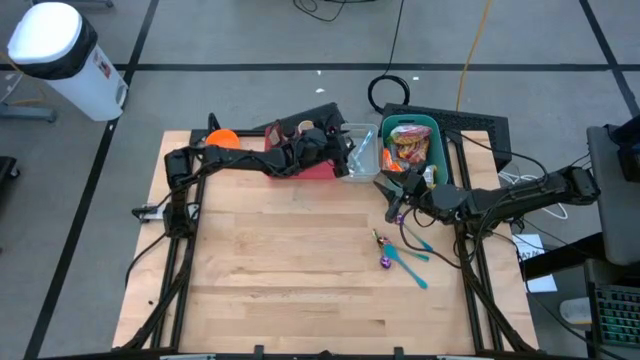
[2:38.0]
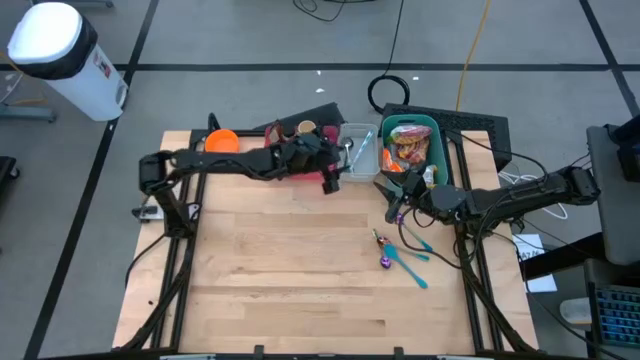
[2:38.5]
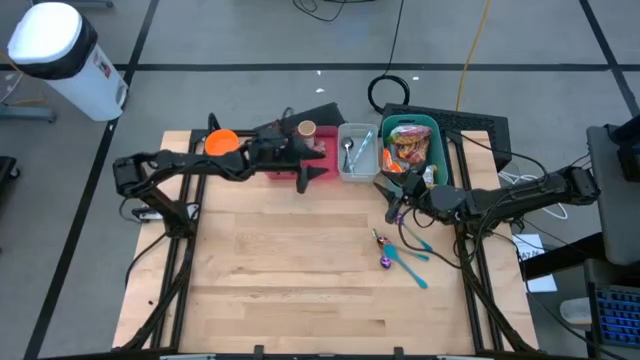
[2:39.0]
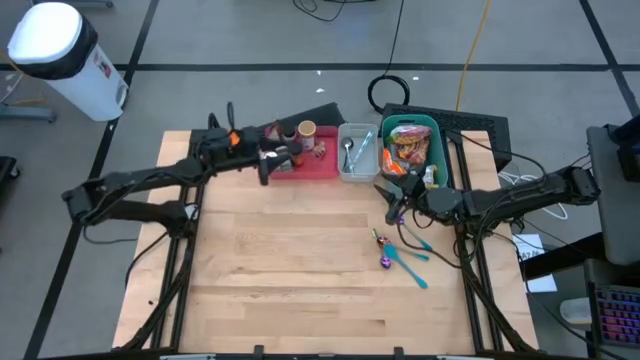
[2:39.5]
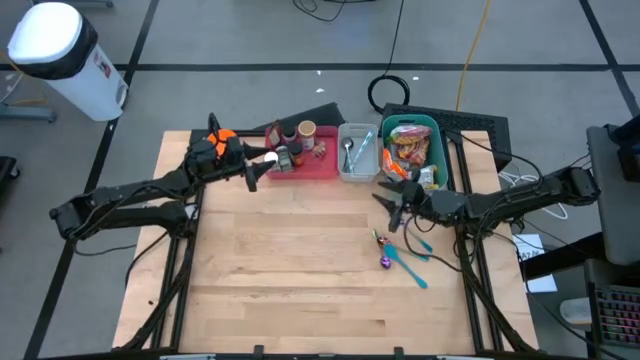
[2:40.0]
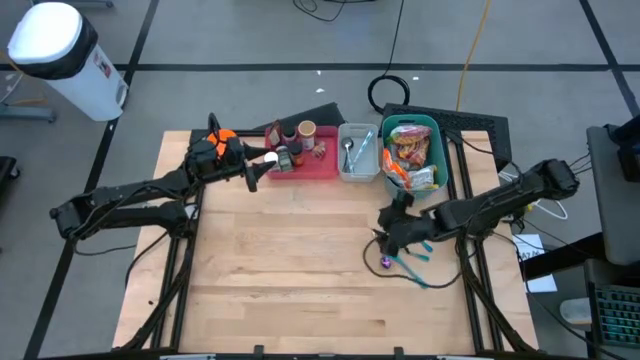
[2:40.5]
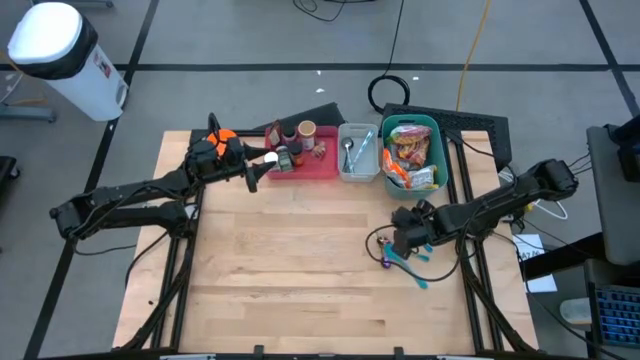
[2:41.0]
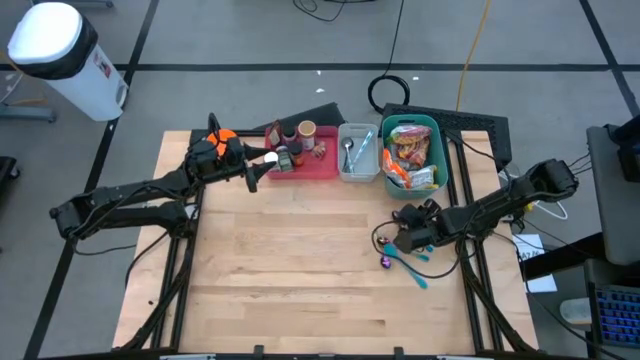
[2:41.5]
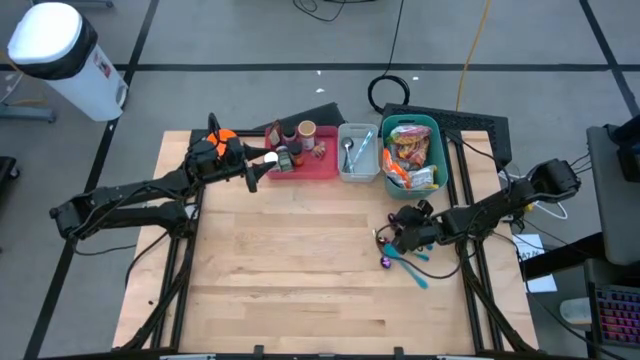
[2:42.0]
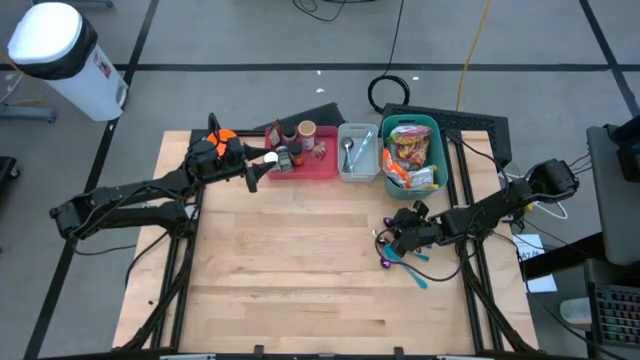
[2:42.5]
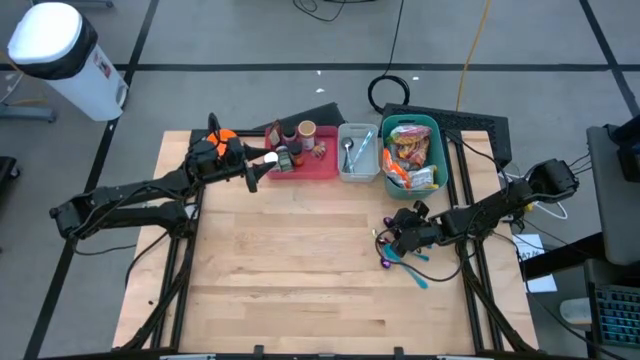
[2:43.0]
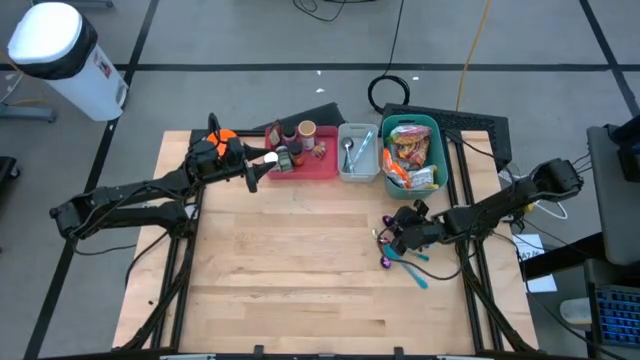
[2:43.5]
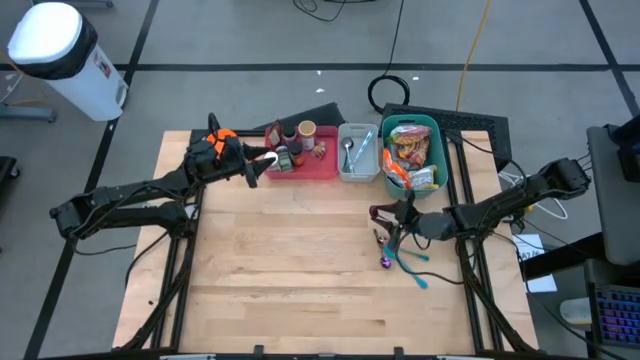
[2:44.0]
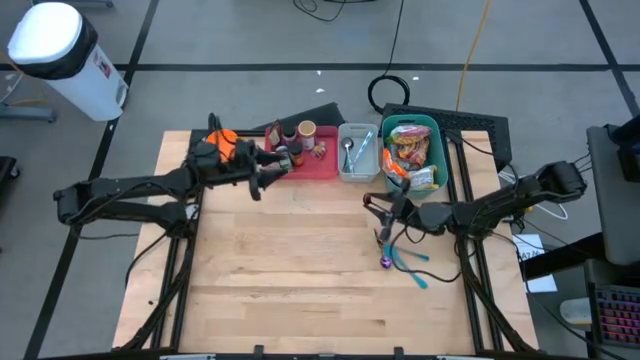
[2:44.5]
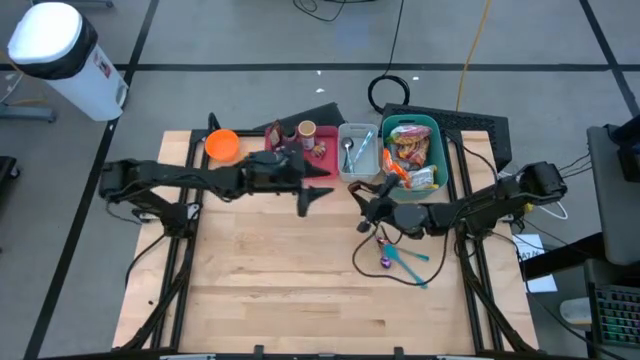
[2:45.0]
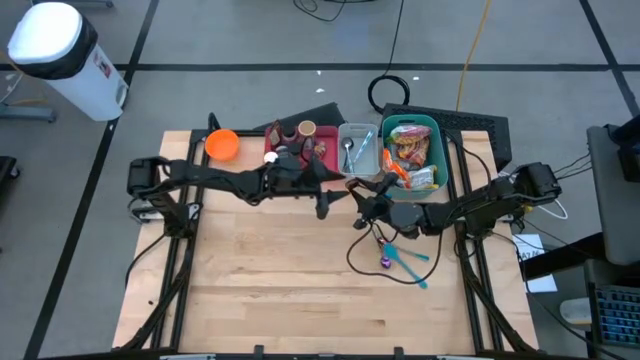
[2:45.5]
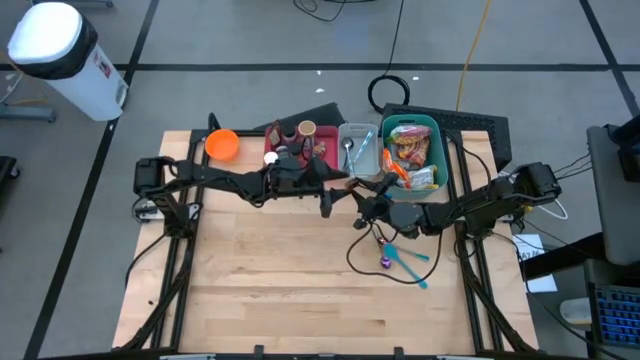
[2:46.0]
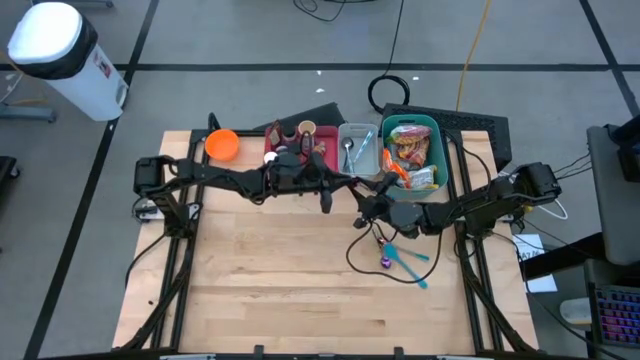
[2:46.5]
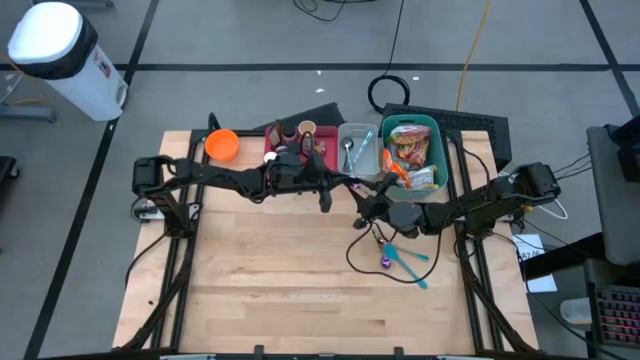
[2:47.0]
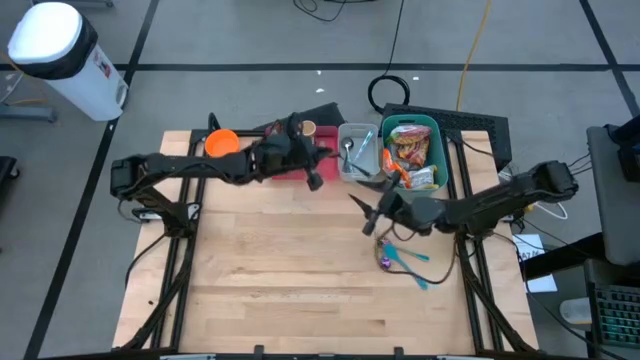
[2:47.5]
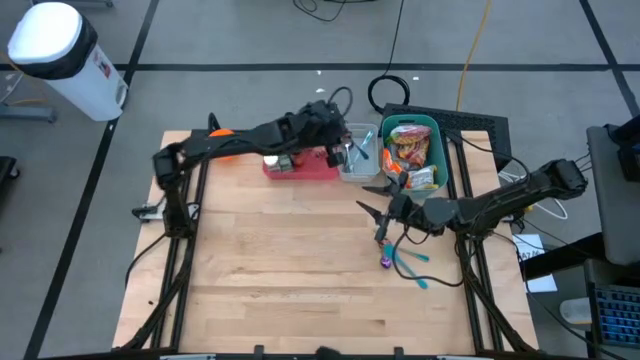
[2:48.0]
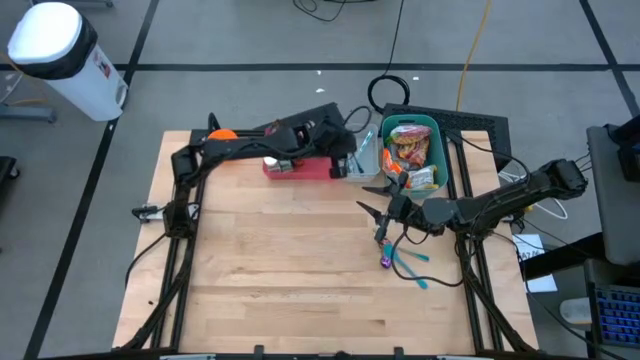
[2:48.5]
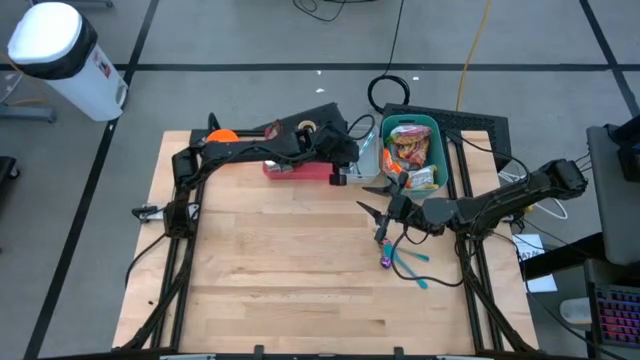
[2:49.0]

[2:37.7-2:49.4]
Task: Pick & Place Food Item
Put the top purple spoon into the white bin

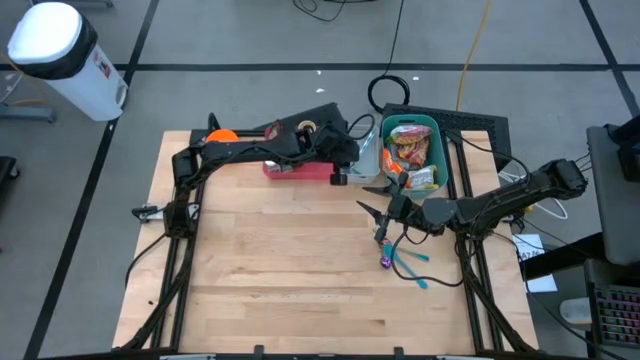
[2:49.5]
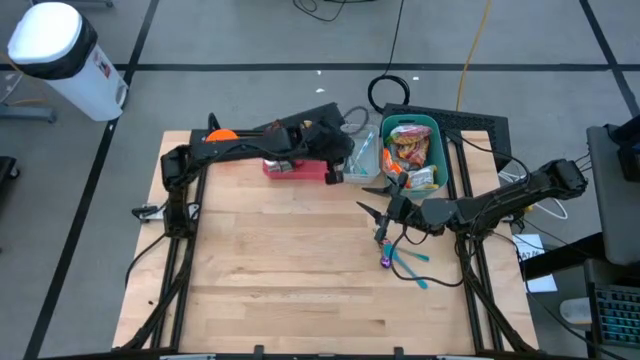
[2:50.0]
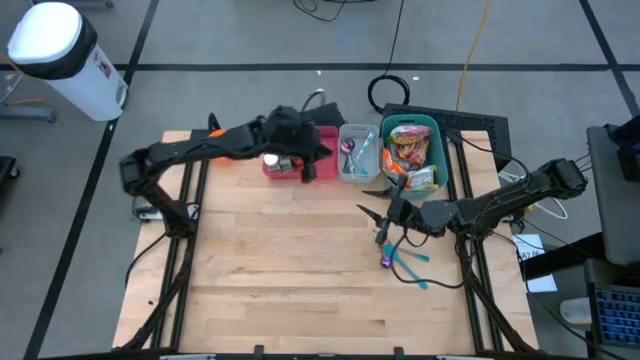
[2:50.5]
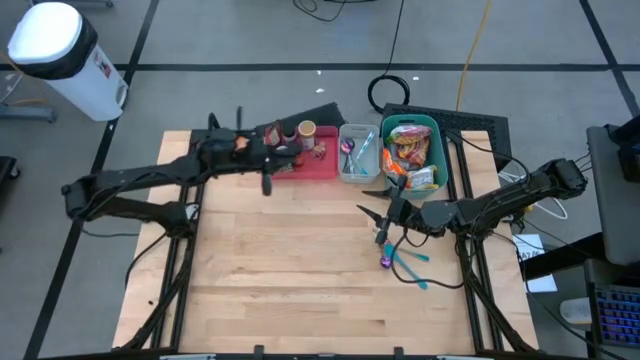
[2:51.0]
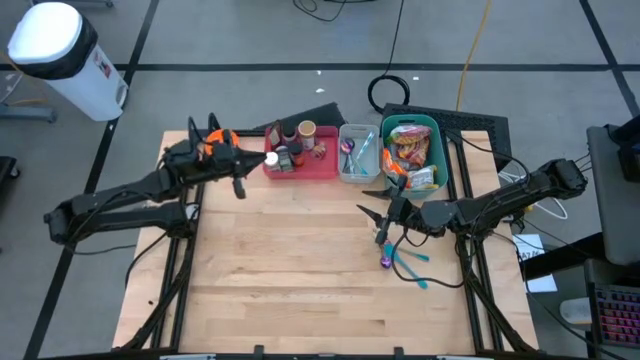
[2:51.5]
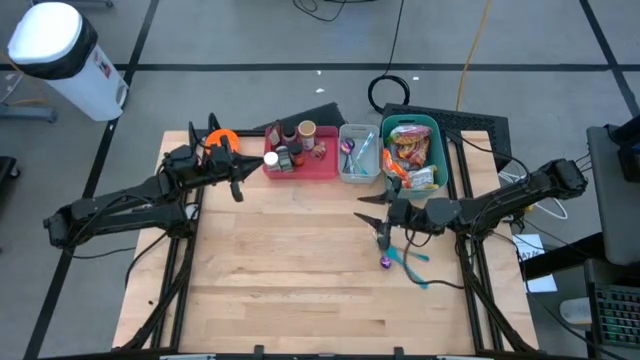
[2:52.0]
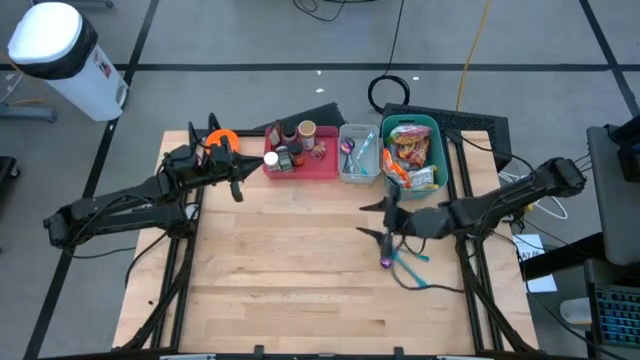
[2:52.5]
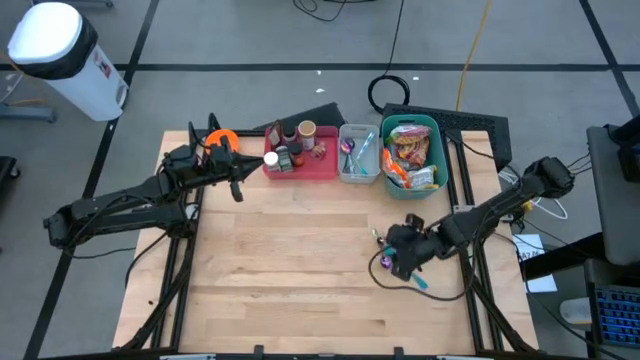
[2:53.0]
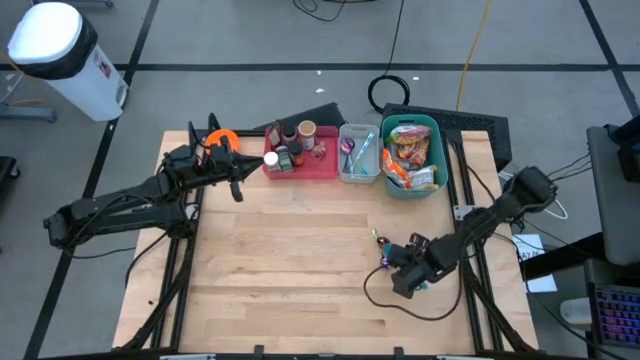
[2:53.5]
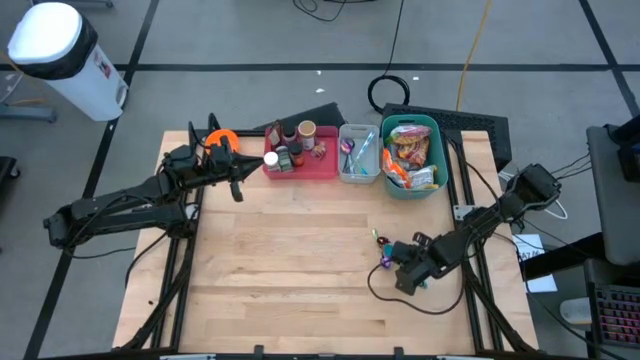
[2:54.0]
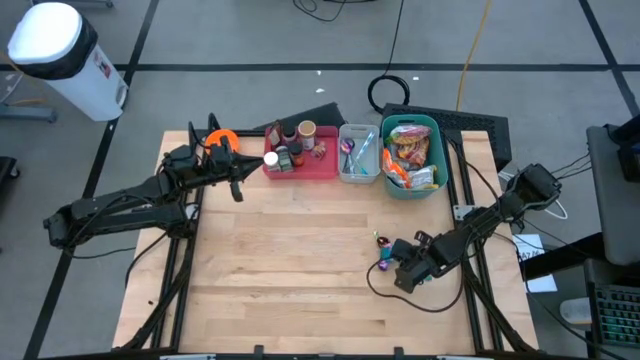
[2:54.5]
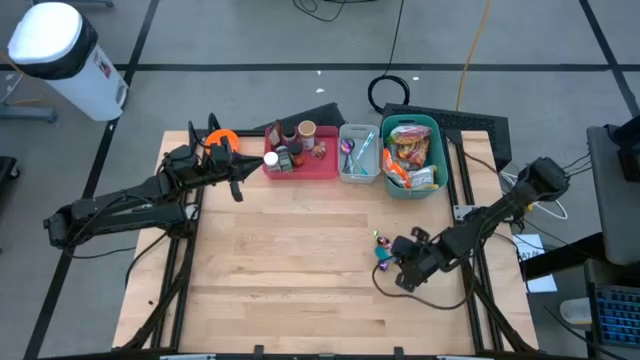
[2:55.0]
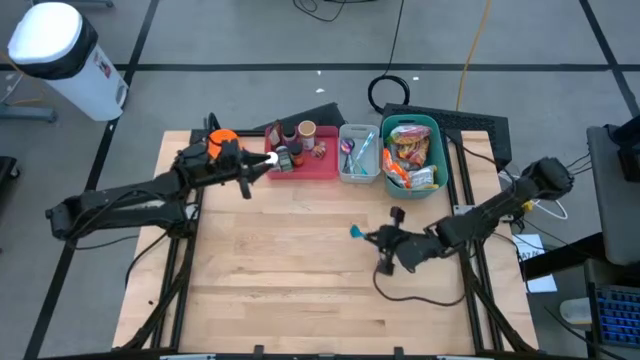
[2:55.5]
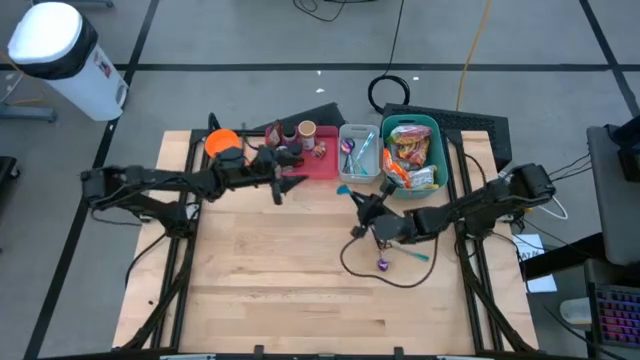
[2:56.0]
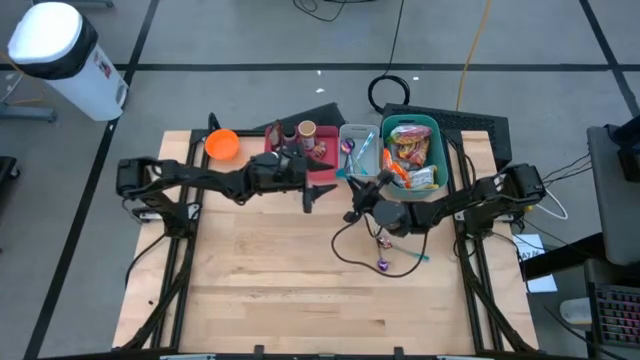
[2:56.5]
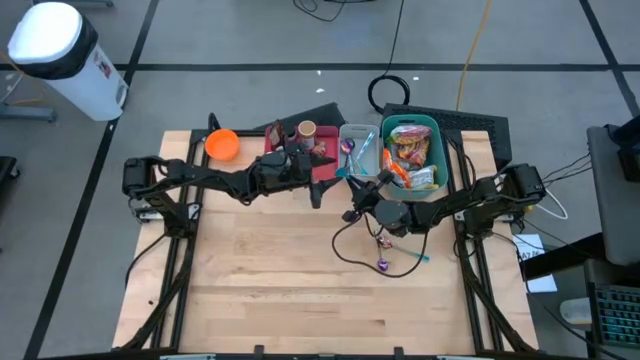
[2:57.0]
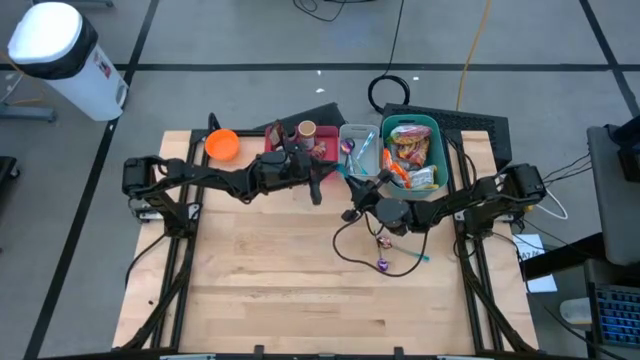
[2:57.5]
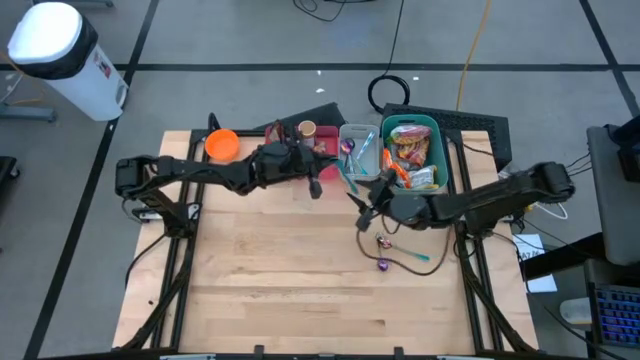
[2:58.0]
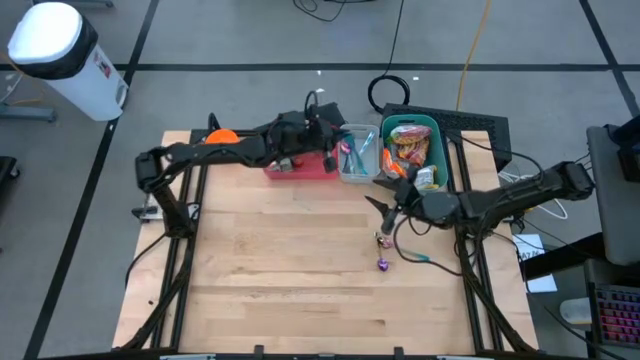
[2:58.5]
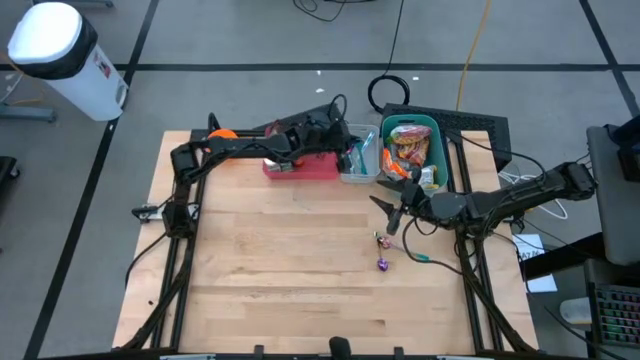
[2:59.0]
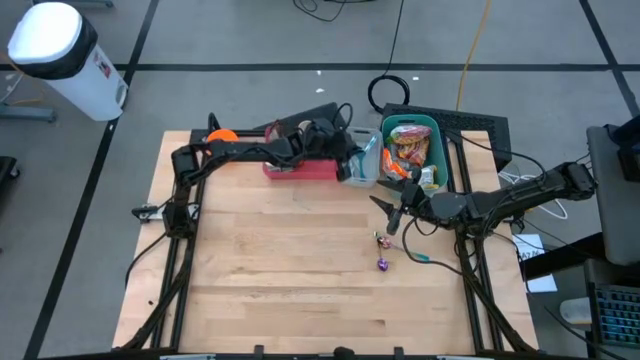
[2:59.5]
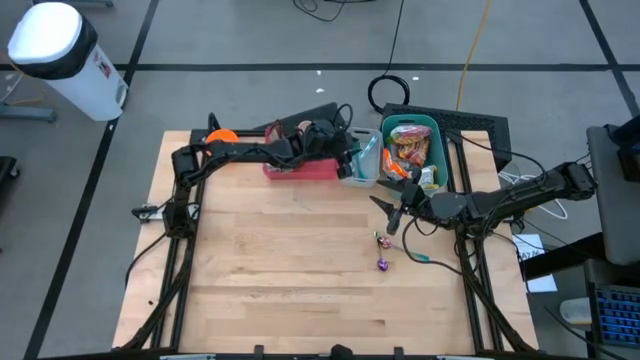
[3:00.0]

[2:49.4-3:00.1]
Put the blue spoon into the white bin
